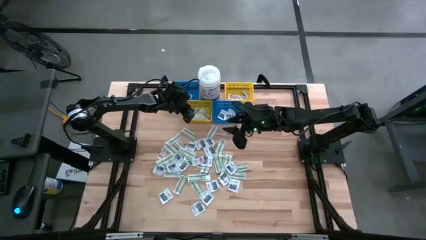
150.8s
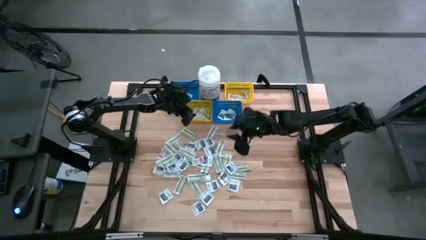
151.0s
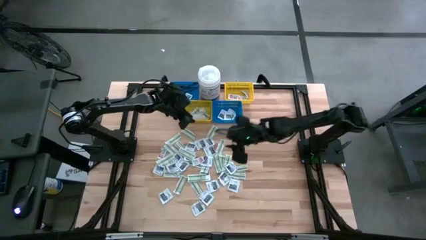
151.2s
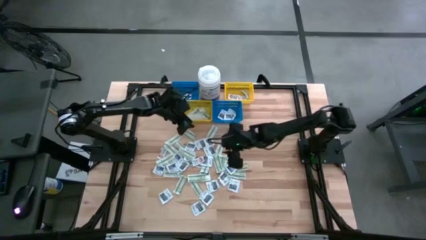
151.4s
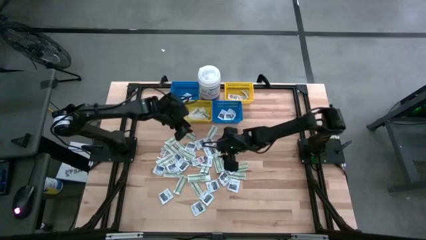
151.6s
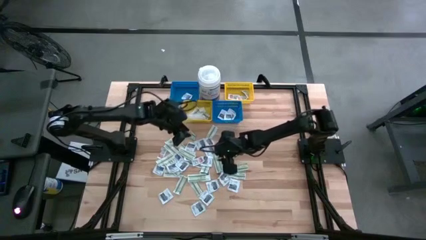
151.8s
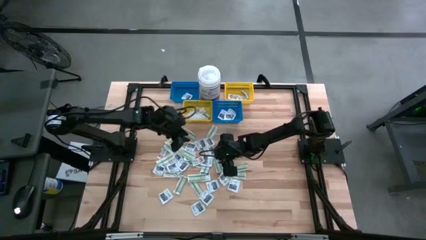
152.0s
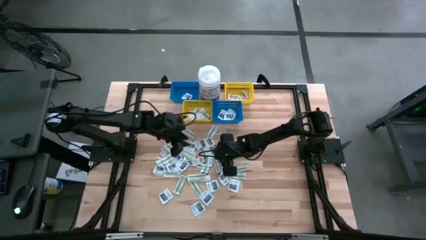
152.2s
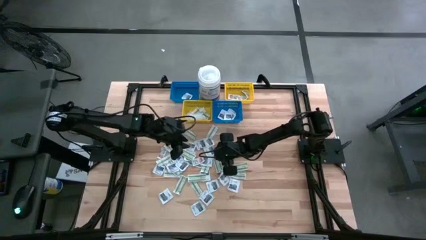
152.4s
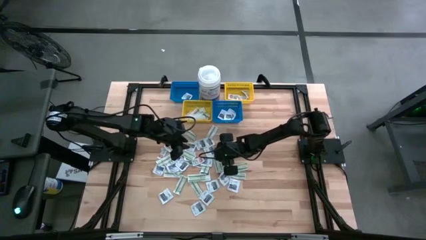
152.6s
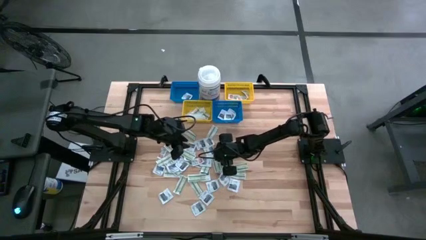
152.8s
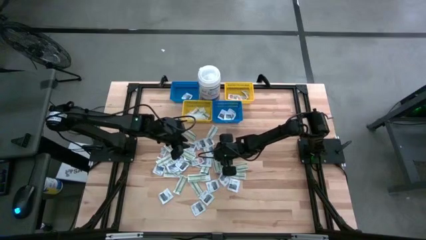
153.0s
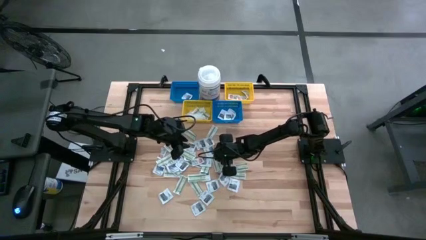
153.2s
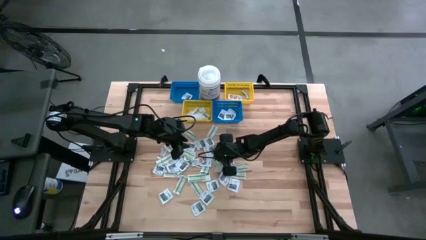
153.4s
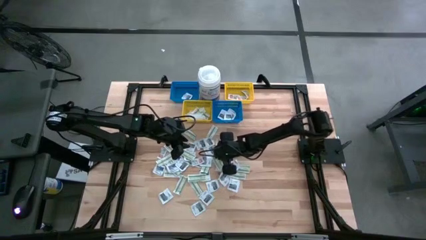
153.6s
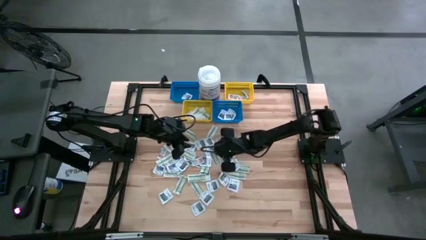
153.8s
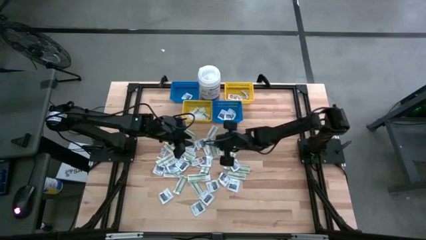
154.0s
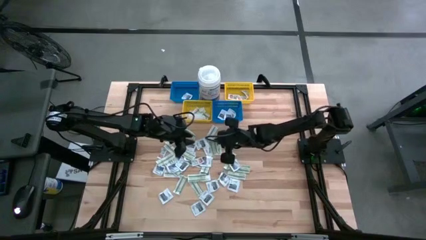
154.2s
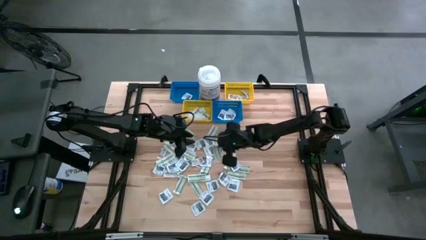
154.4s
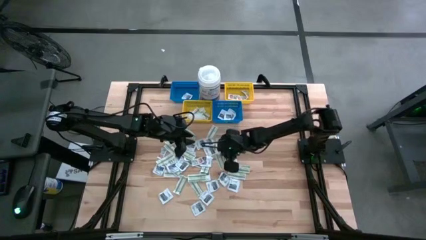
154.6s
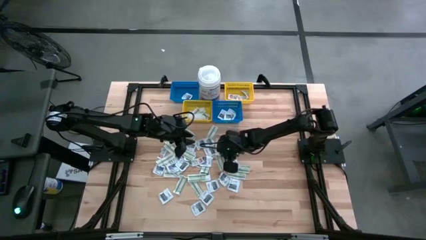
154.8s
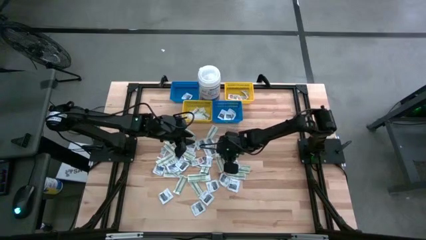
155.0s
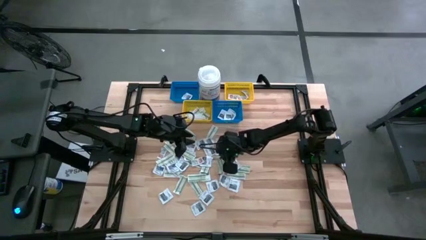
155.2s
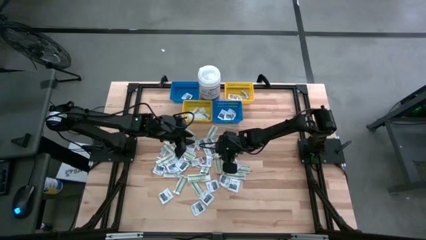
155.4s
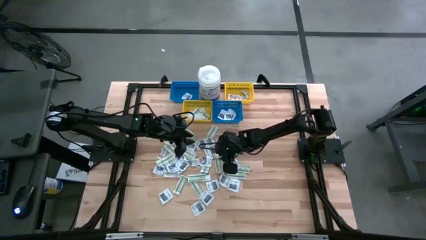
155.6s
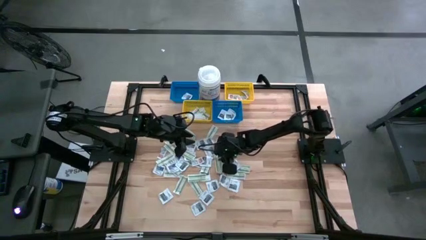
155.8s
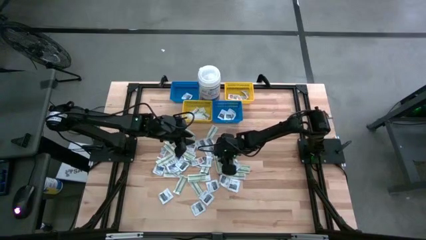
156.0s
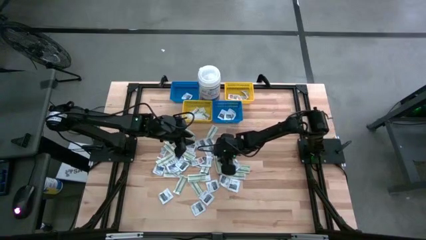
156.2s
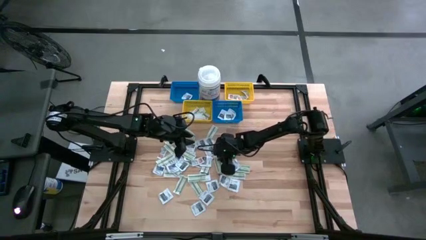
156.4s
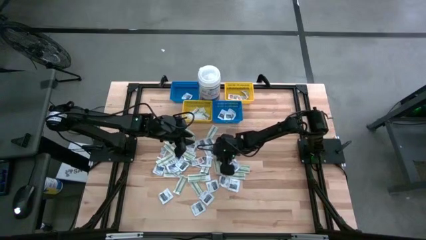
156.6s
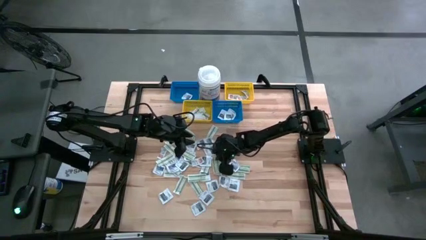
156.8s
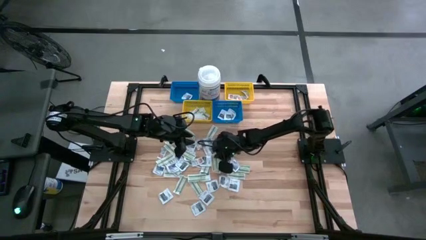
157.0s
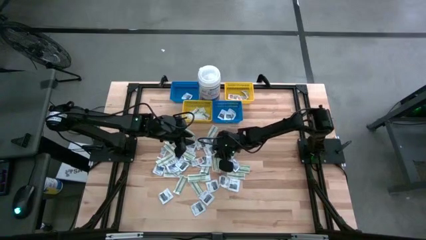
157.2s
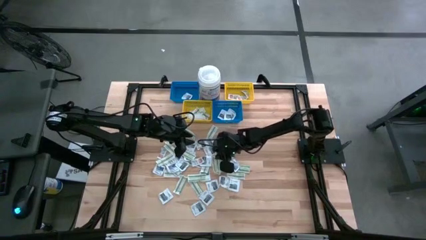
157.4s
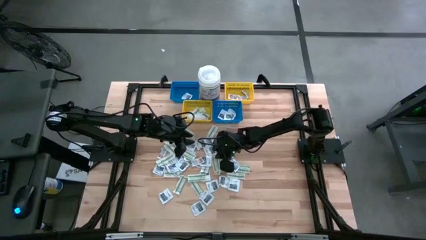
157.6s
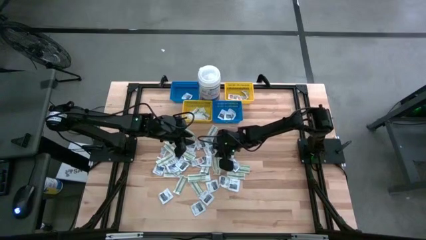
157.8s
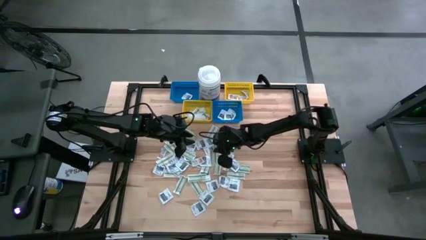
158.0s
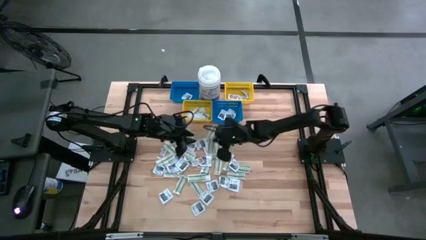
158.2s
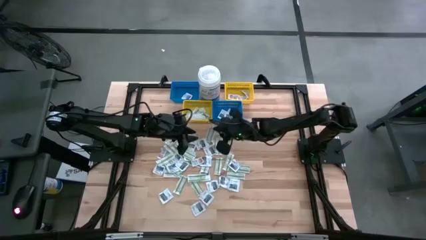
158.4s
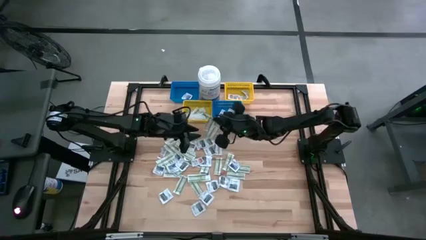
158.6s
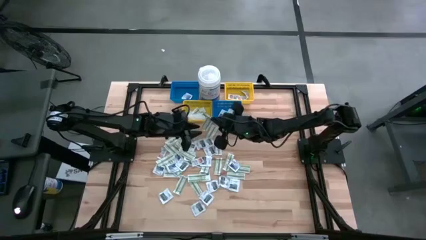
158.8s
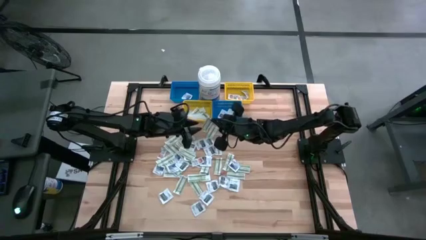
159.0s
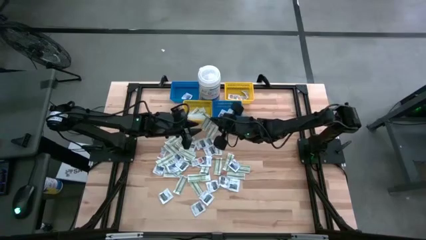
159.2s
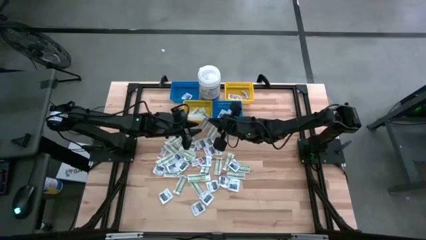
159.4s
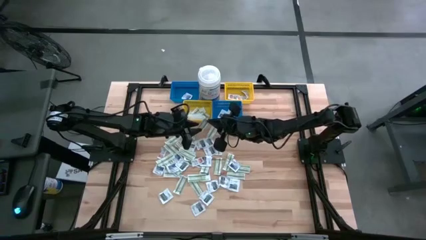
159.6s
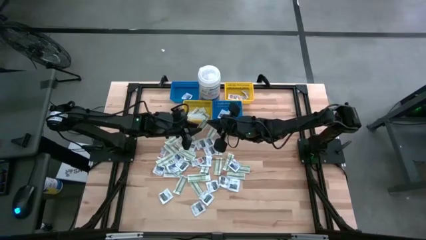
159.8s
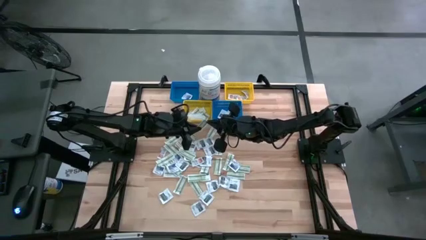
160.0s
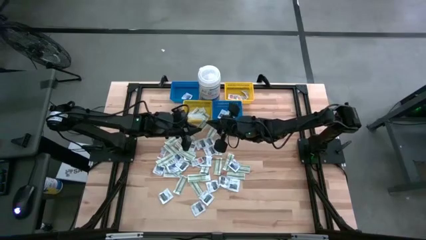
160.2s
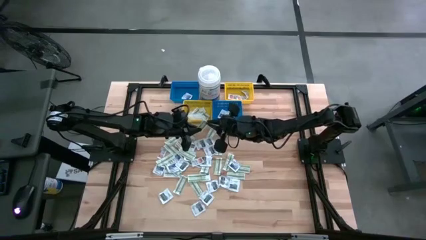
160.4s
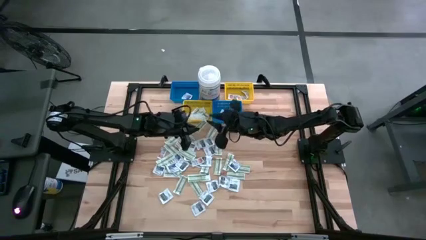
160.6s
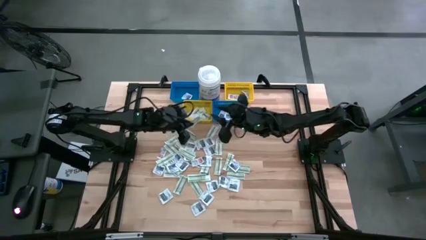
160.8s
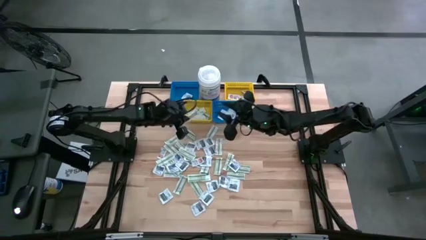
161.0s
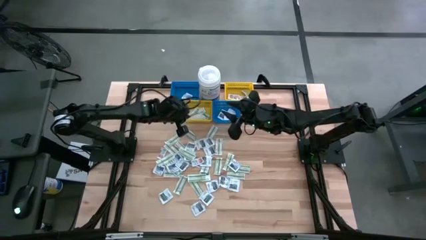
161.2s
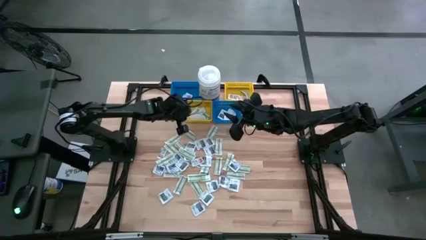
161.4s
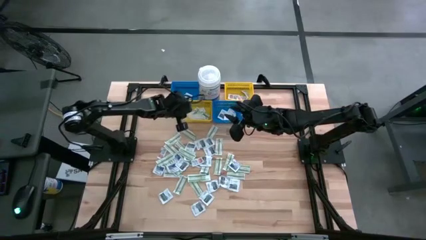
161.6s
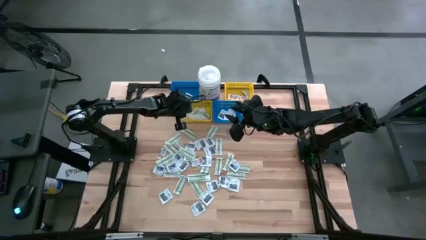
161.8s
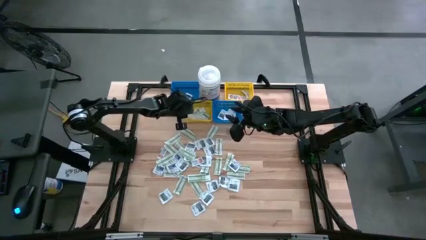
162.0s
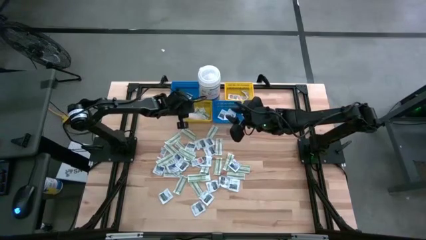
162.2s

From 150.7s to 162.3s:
Task: Pick & Place First Aid Supplies
Put the green bandage pad into the left yellow bin

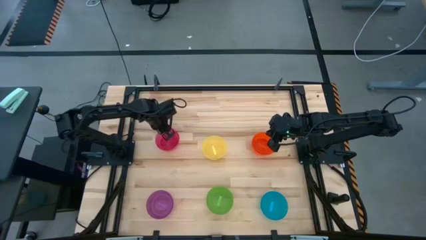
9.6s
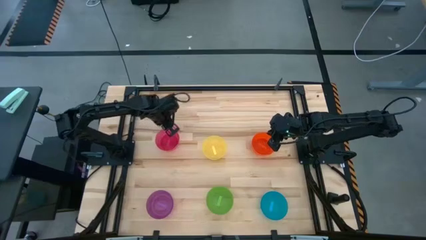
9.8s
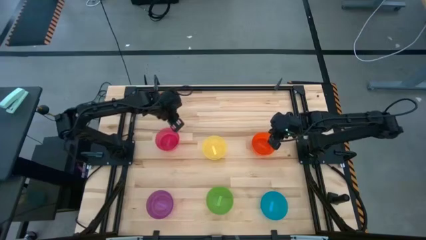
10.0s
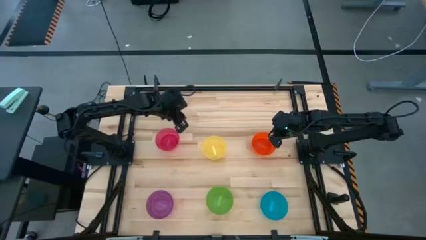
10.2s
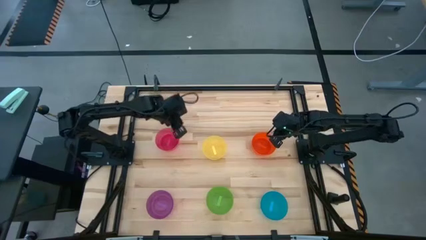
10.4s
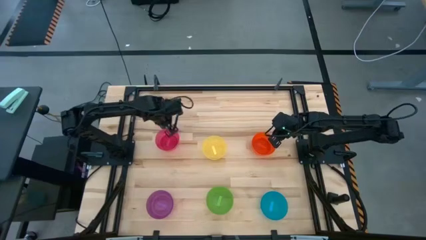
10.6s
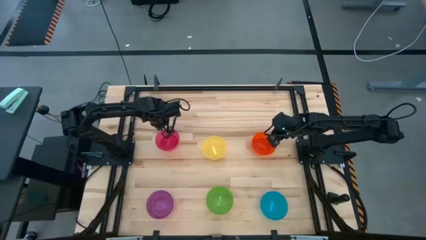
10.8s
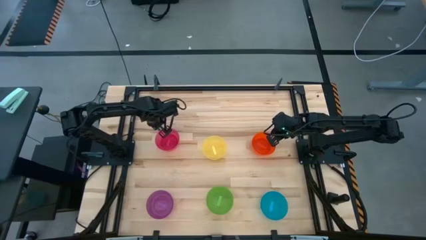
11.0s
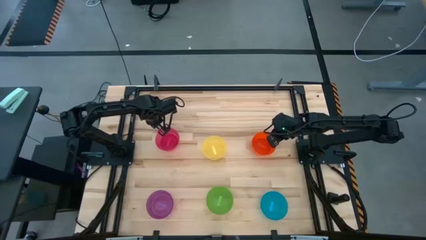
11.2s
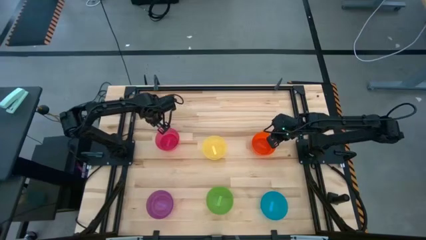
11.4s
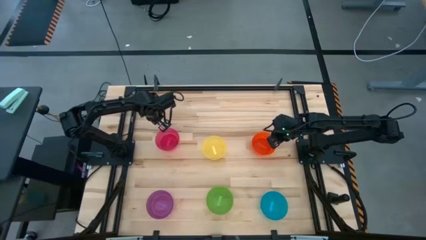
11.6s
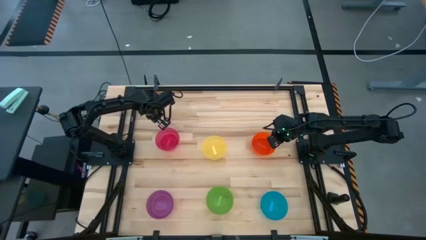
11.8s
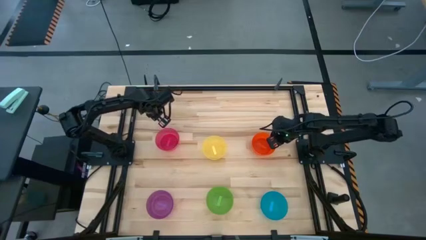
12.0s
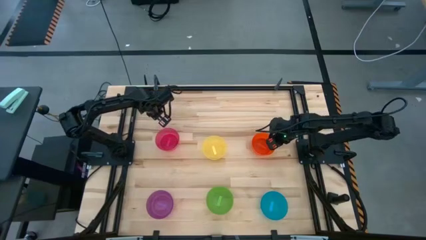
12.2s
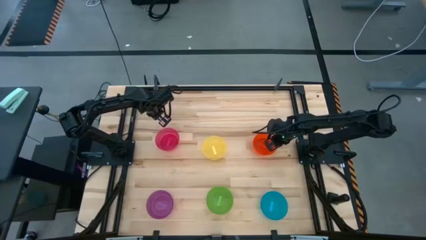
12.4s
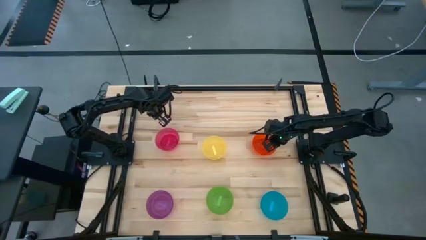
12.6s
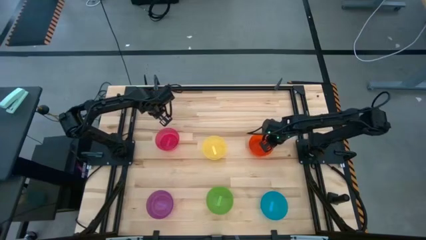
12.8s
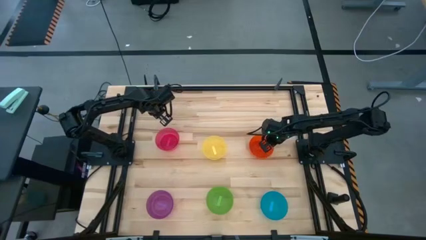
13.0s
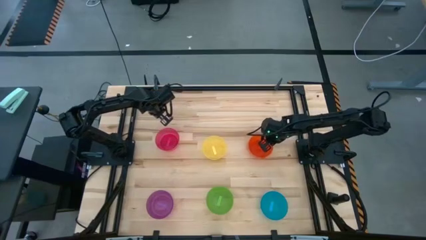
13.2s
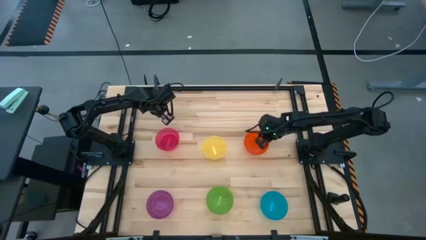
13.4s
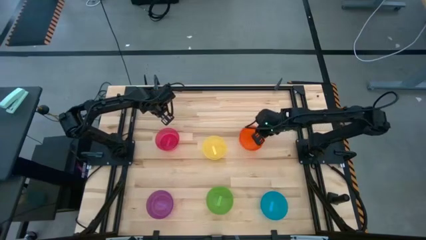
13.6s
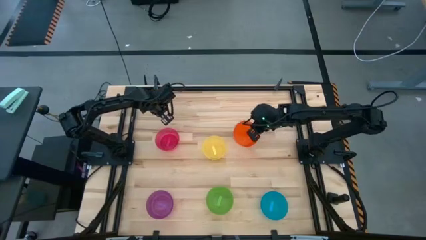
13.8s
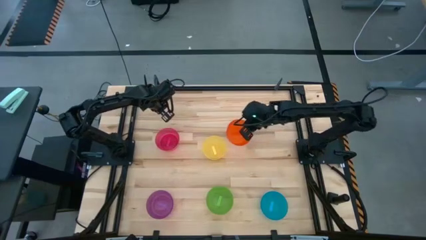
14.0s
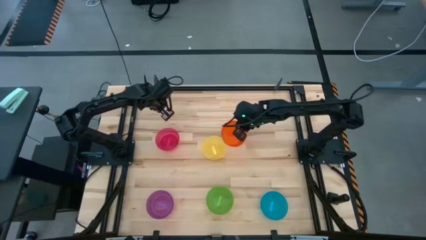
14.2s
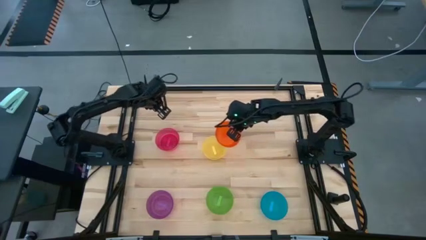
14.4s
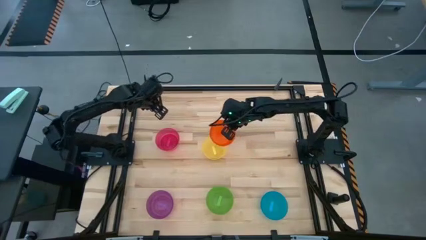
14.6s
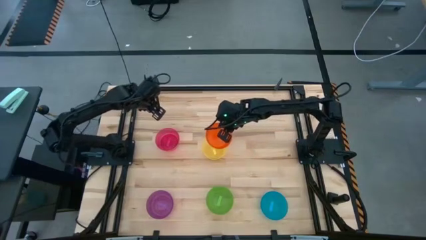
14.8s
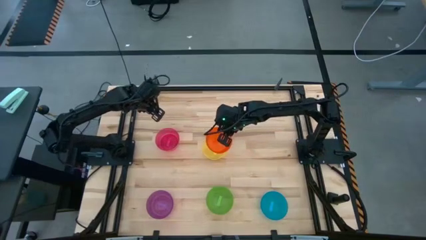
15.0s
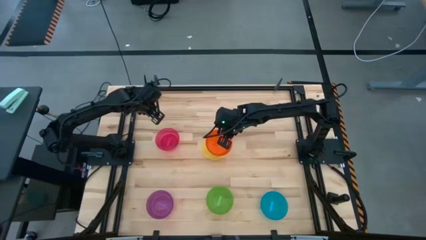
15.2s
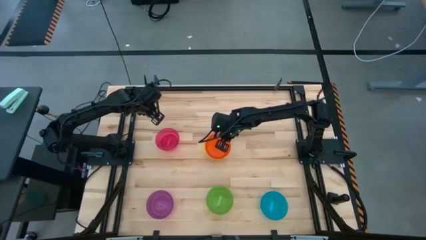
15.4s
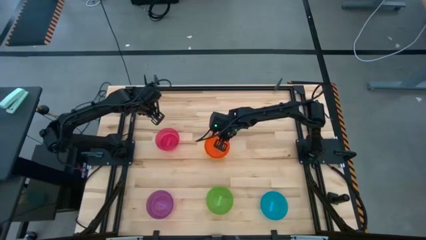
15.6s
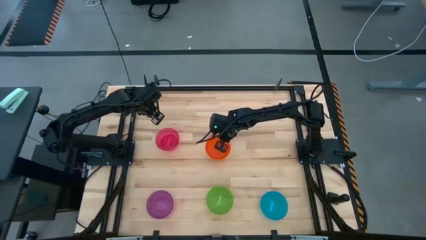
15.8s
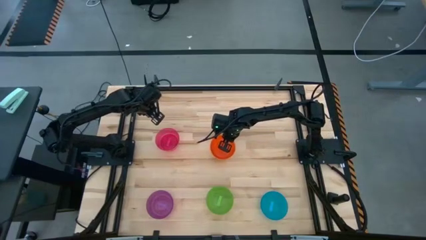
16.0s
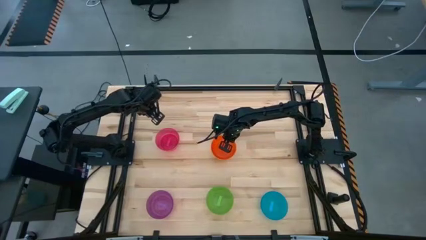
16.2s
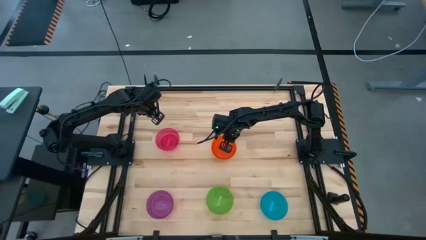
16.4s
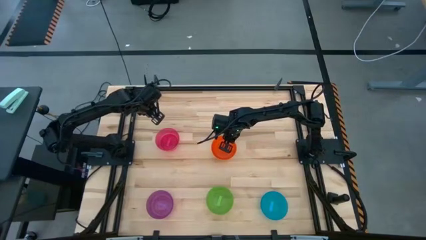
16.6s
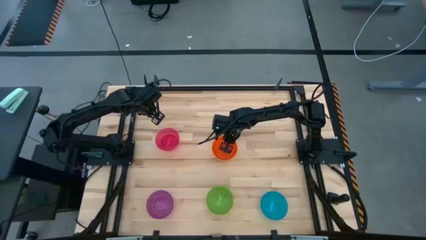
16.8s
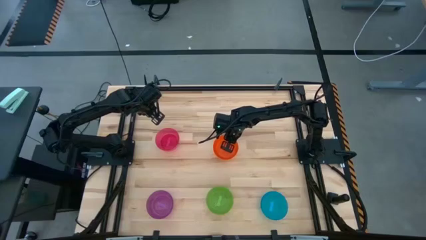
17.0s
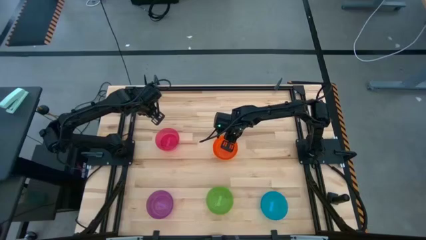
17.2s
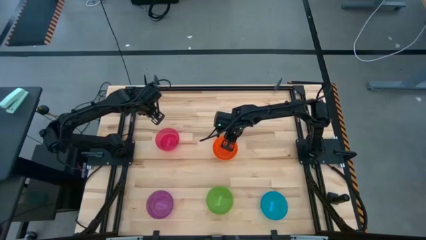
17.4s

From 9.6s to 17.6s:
Task: Nest bowls inside each other
Stack the orange bowl on top of the yellow bowl
